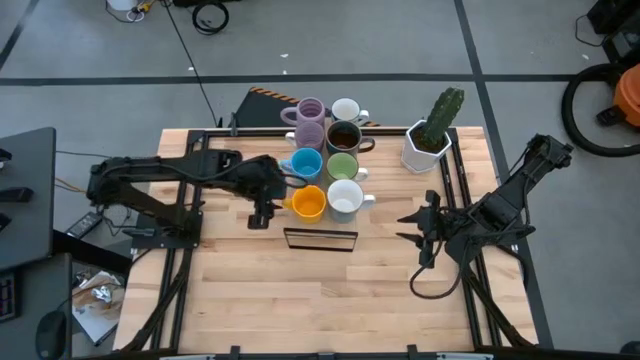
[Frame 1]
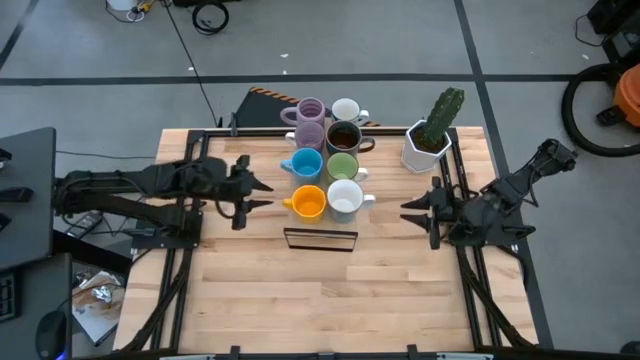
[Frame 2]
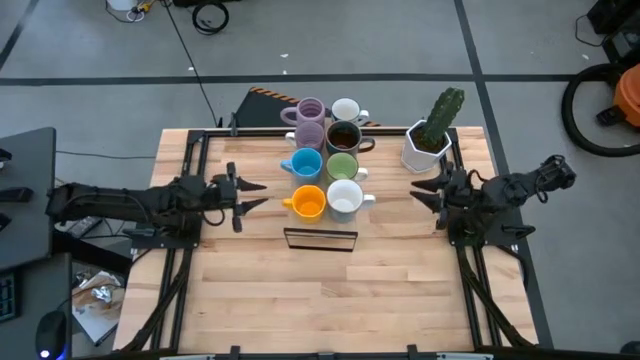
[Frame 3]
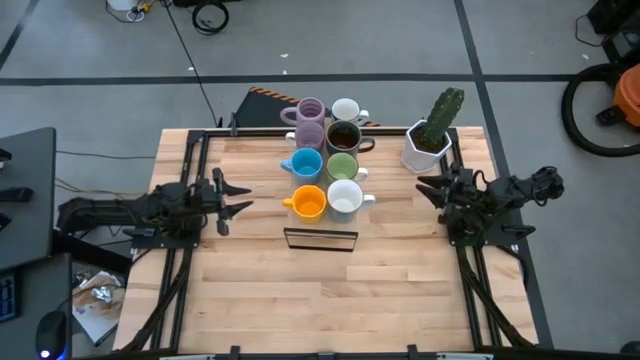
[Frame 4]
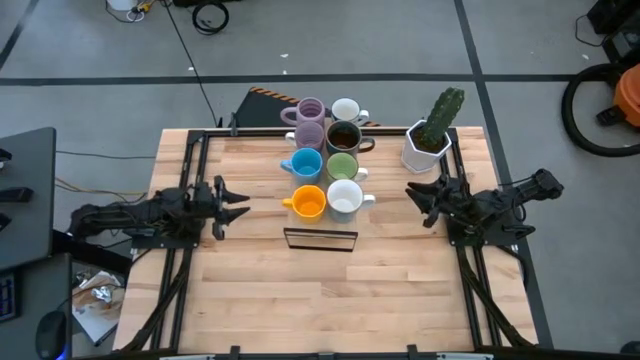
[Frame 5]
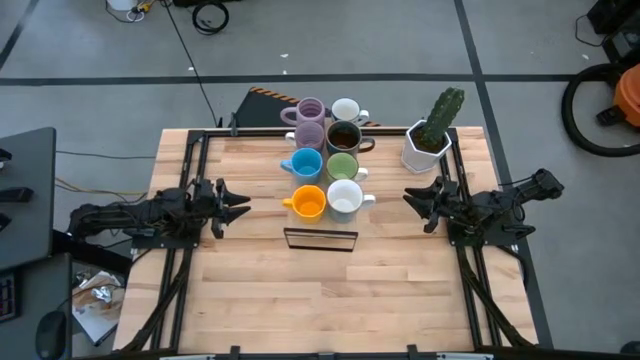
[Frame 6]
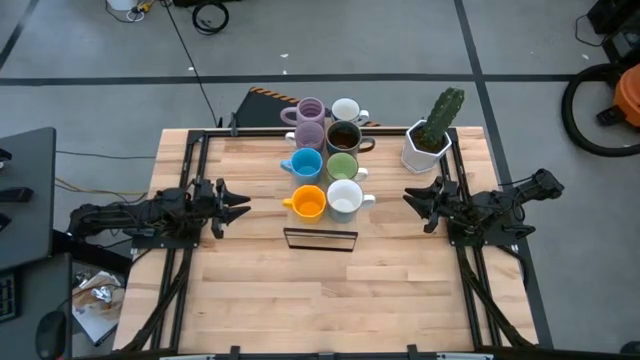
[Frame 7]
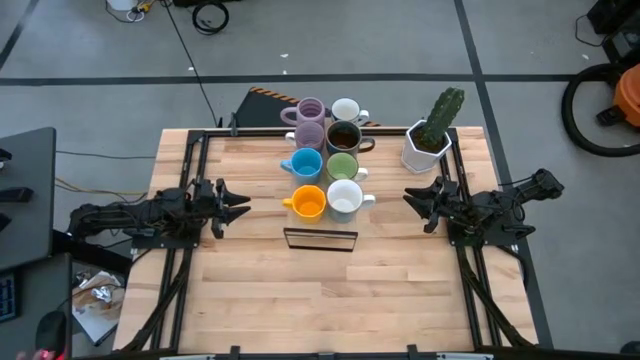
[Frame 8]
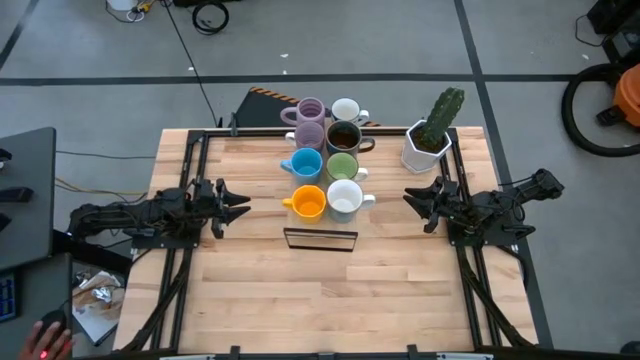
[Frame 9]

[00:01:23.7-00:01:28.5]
Task: Place coffee mugs
Return to Home Position

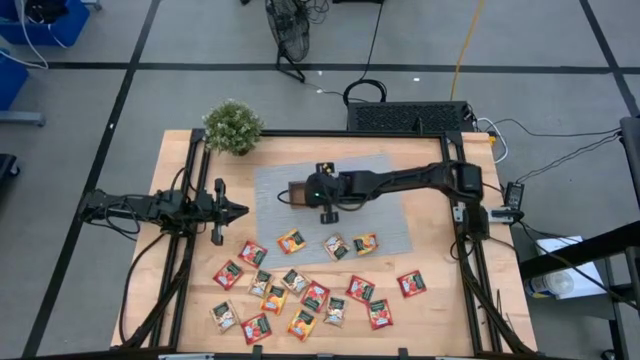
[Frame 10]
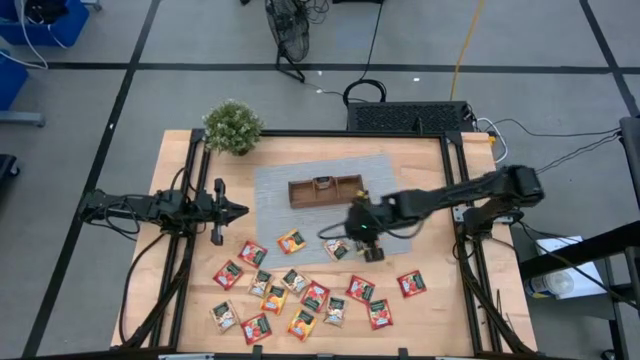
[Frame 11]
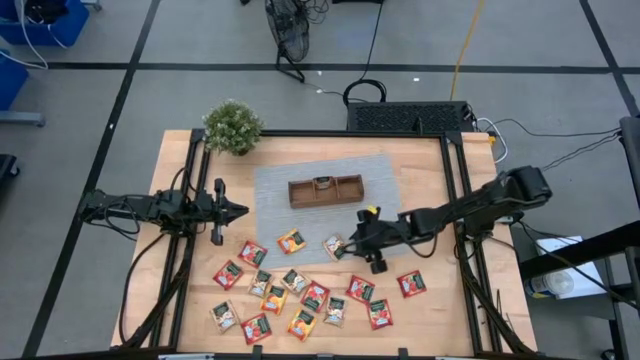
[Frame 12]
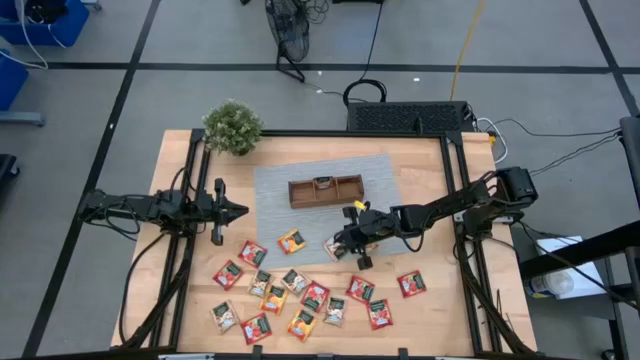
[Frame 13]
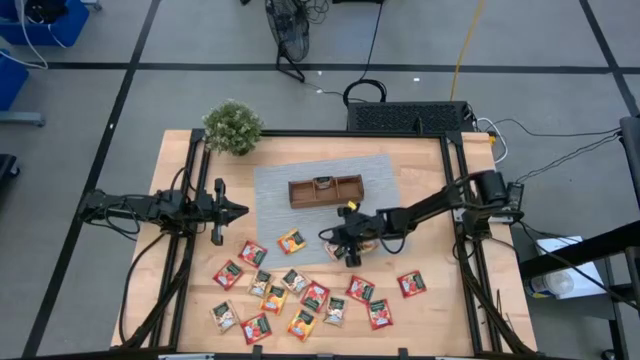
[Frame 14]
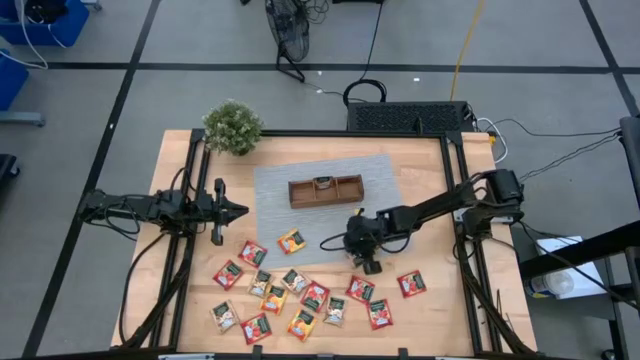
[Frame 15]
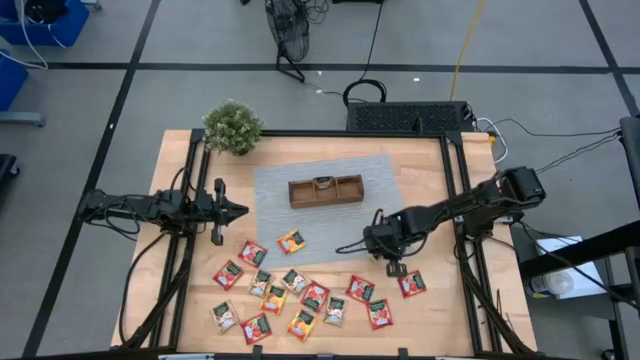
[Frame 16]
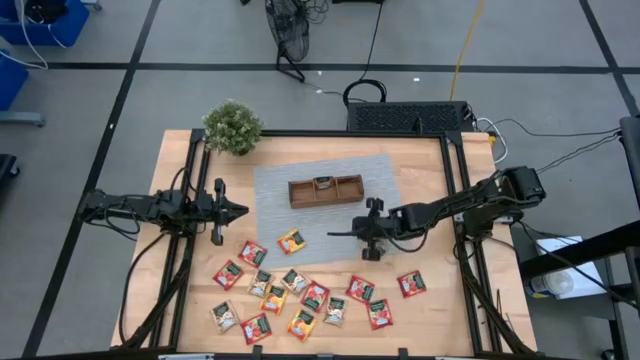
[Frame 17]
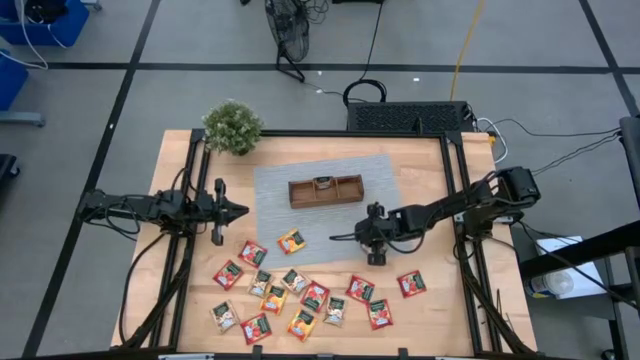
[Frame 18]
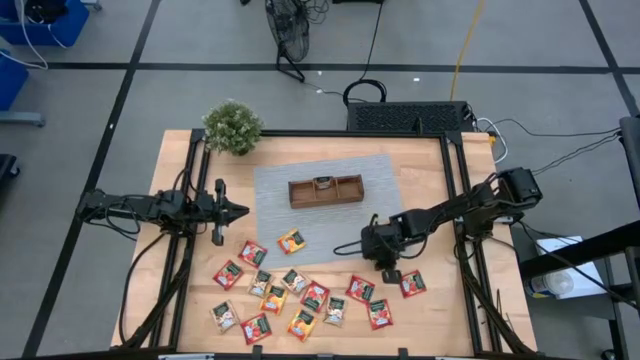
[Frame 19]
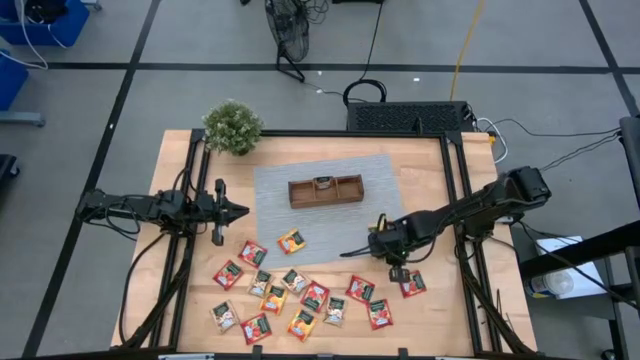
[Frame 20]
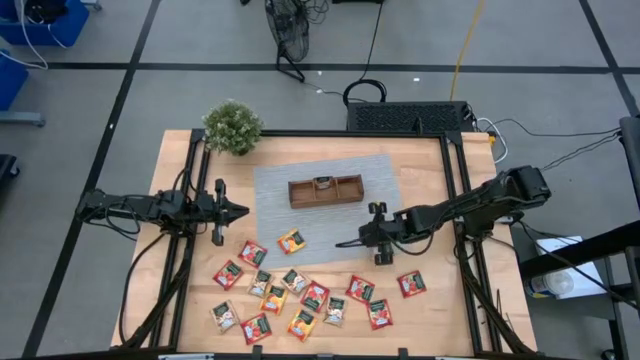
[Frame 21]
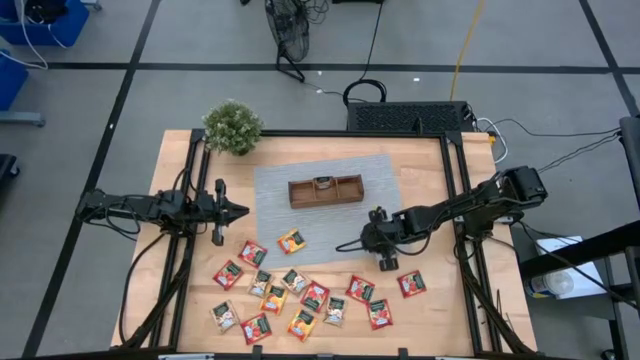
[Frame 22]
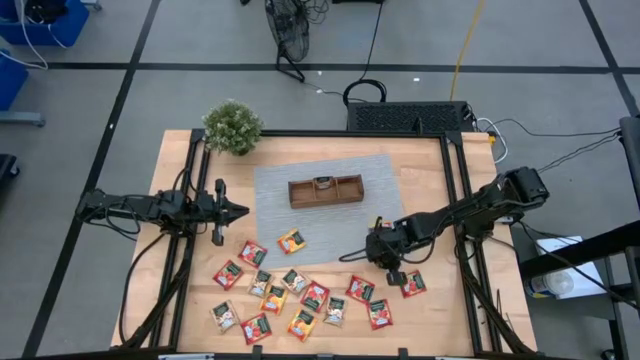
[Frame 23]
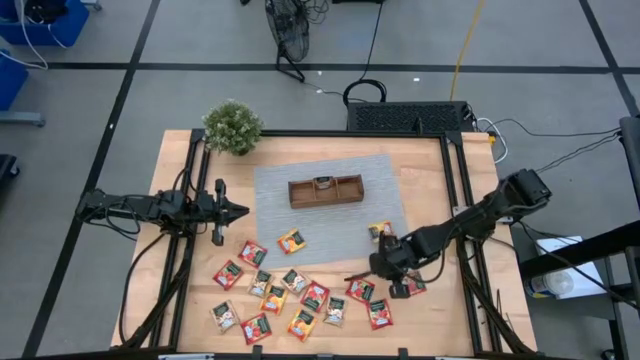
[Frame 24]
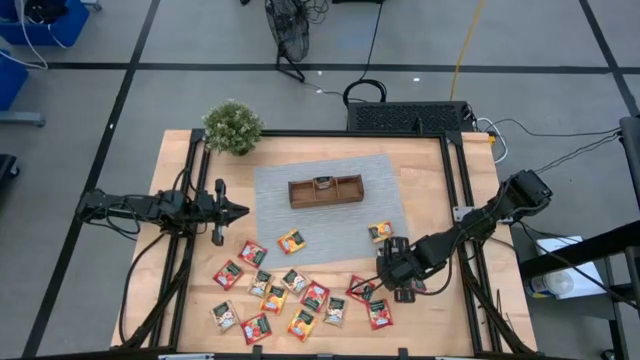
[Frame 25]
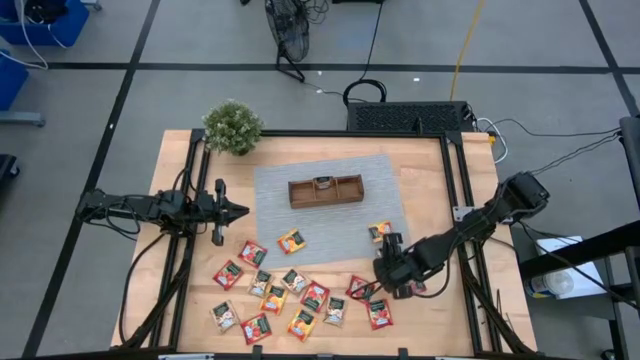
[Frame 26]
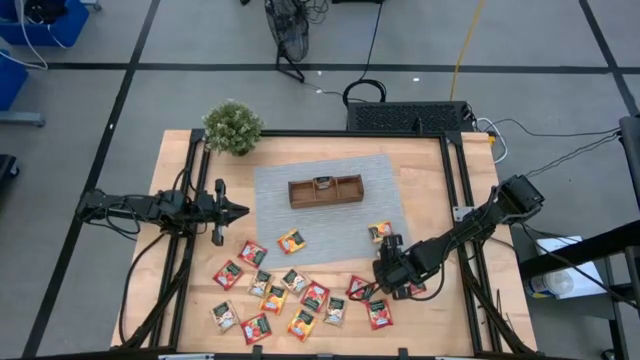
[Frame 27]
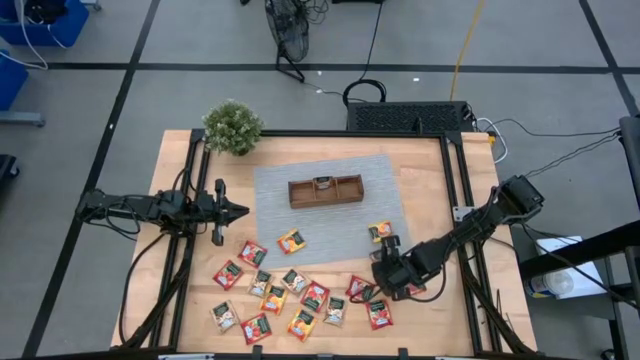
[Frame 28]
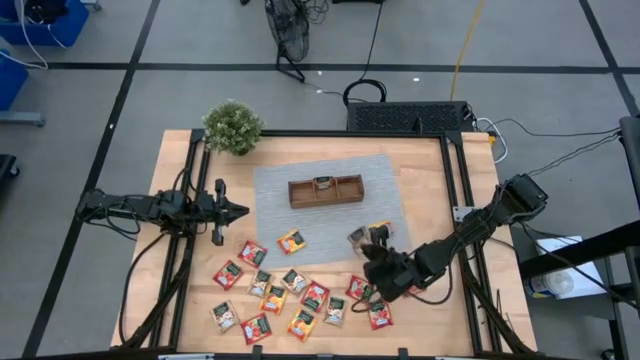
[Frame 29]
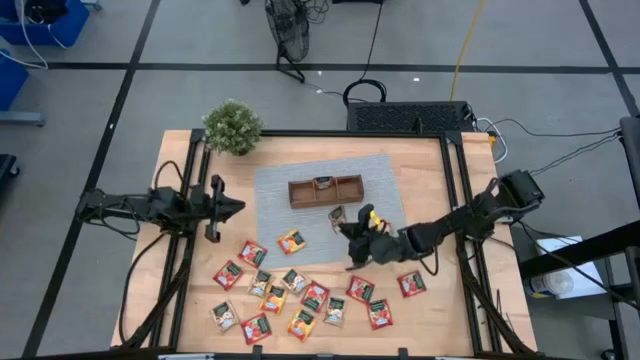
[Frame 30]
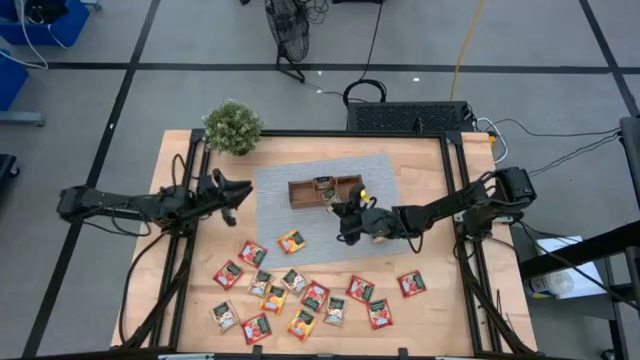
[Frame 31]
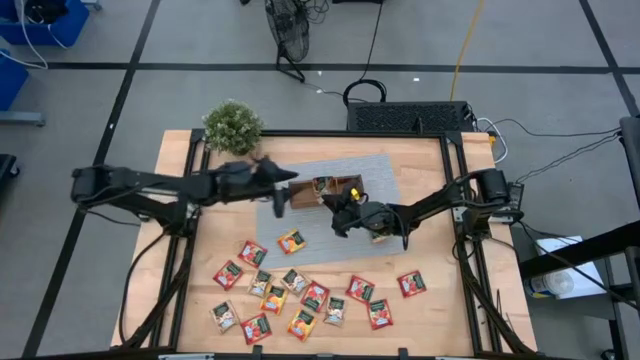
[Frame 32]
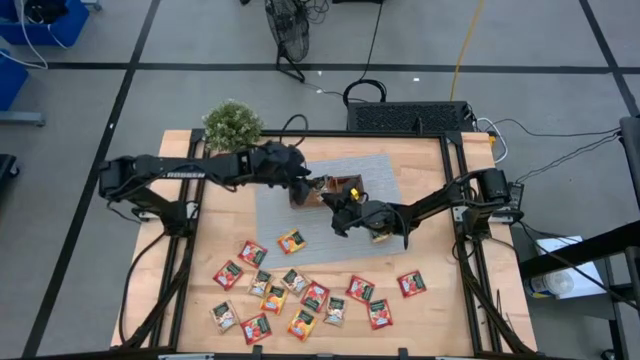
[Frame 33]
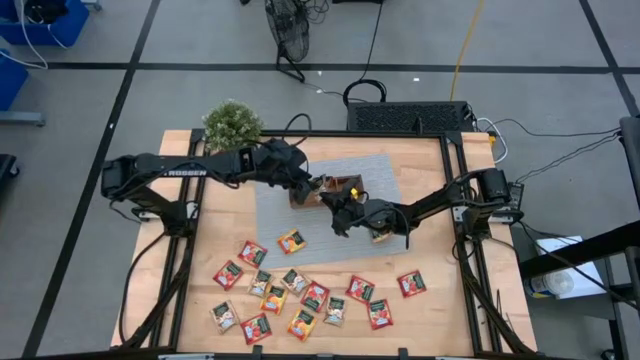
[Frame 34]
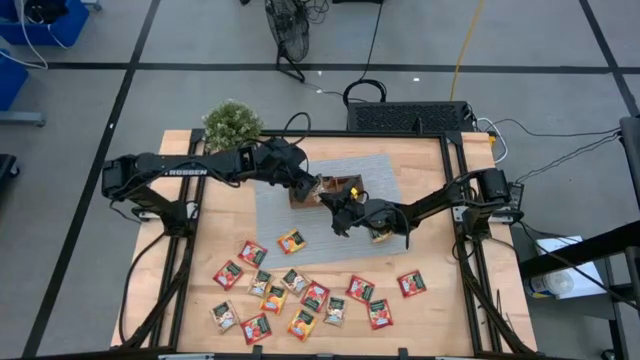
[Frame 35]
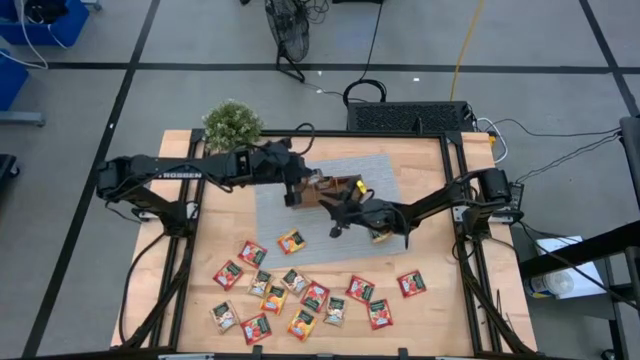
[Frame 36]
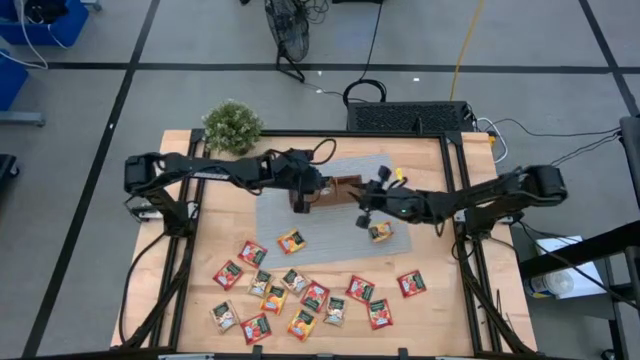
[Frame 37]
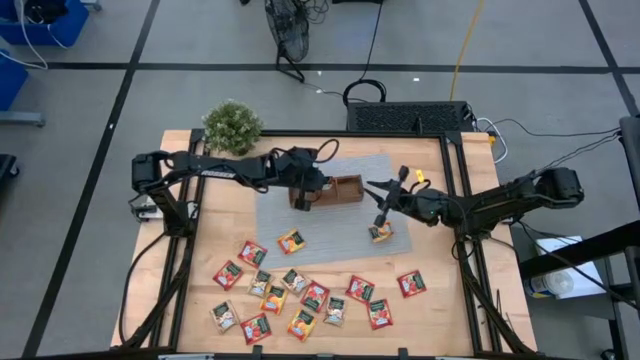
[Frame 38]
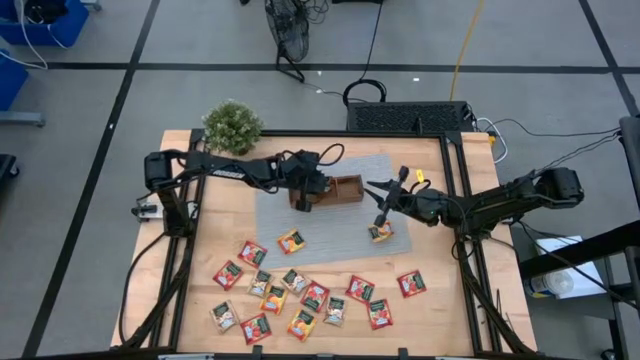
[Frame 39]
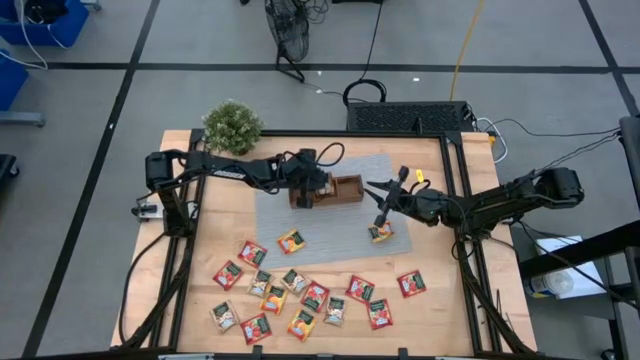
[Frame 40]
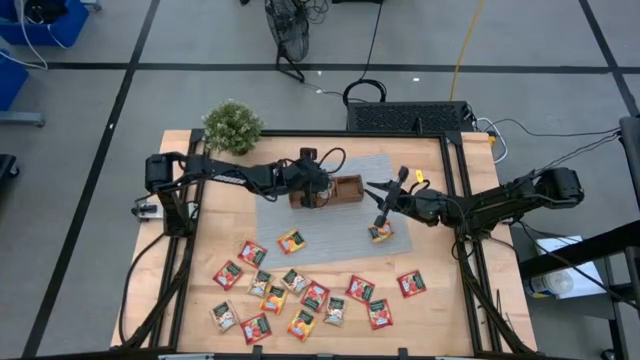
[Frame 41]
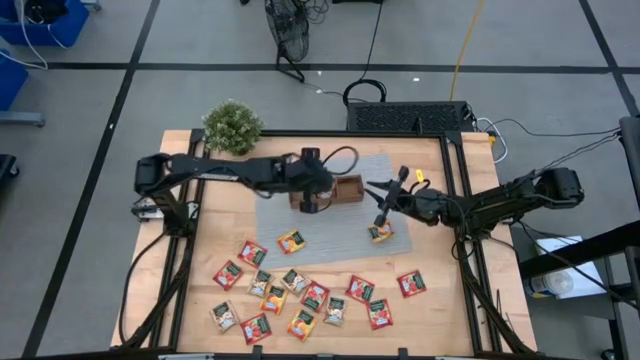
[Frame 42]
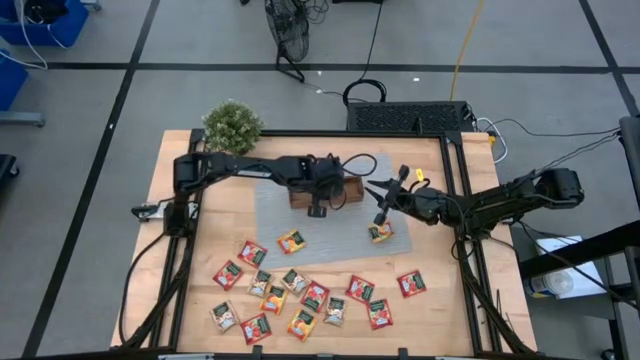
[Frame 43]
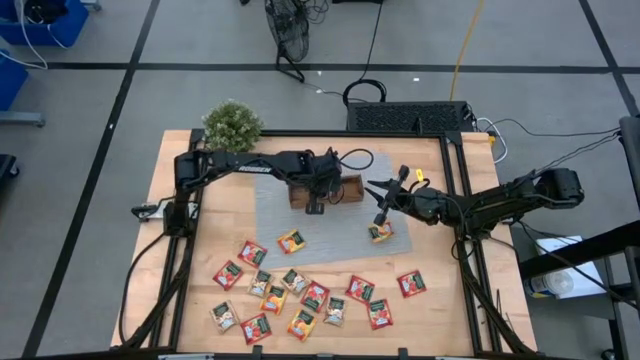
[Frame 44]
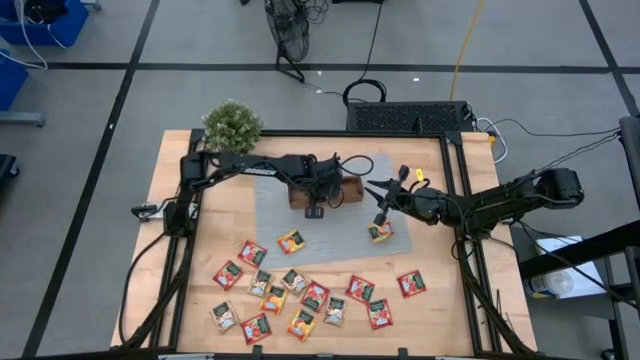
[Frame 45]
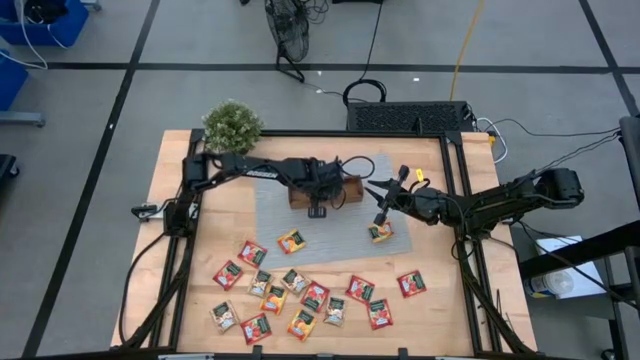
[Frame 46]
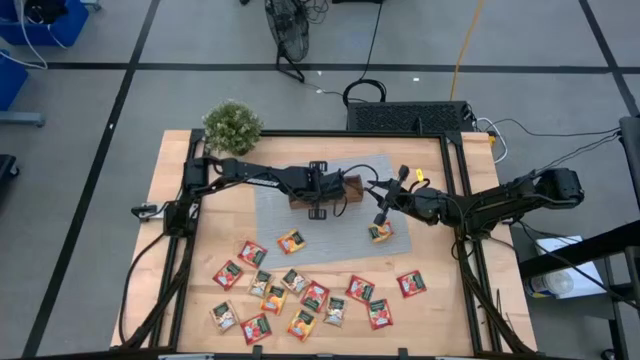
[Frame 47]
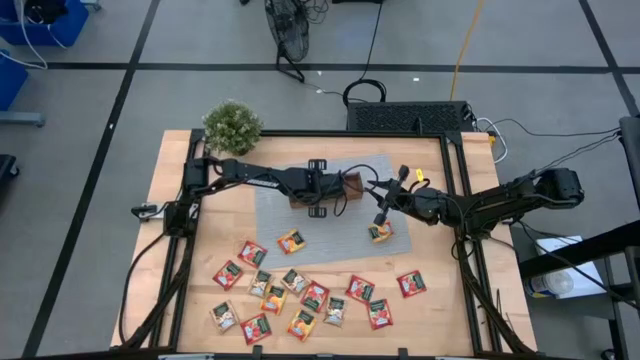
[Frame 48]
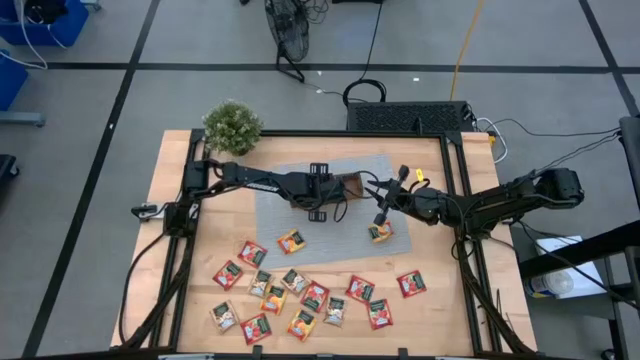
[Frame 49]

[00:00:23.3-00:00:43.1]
Task: Pick & Place Tea
Put the brown tea bag into the middle section of the wooden organizer
